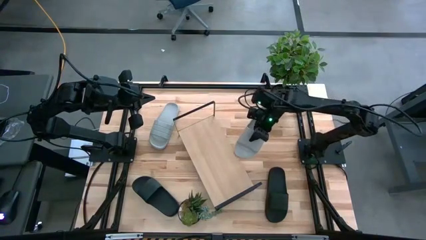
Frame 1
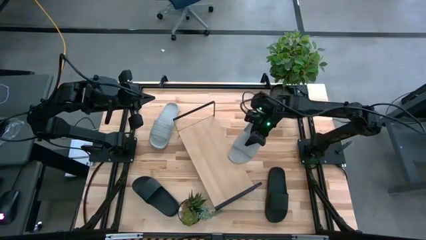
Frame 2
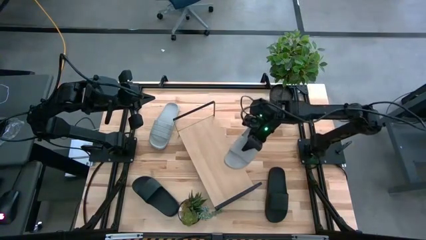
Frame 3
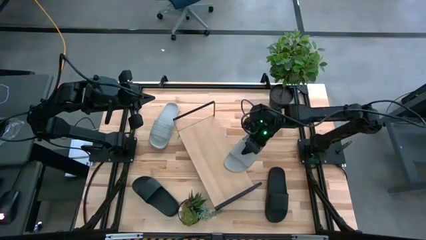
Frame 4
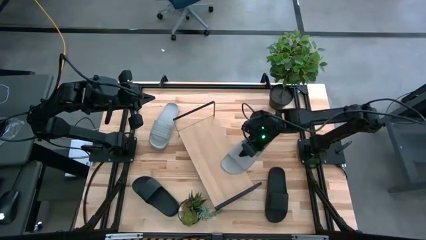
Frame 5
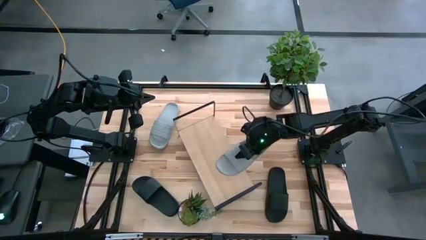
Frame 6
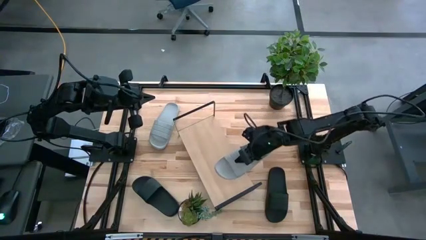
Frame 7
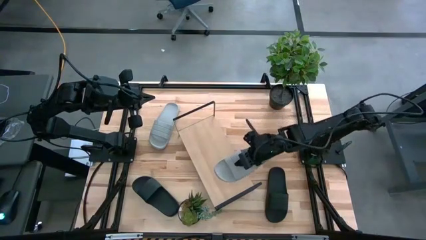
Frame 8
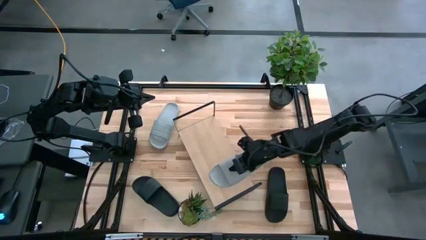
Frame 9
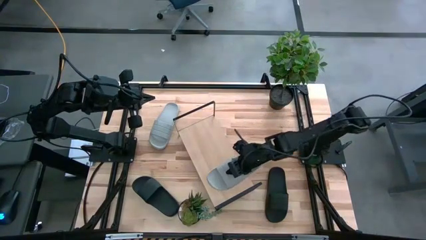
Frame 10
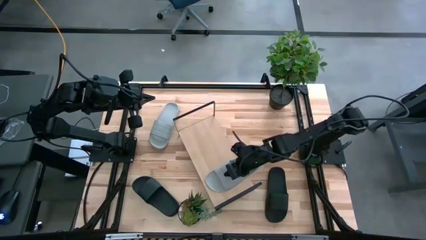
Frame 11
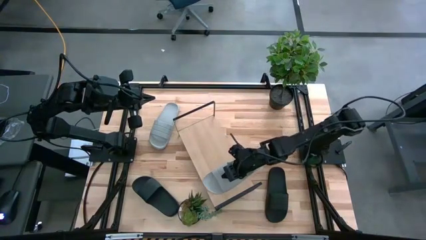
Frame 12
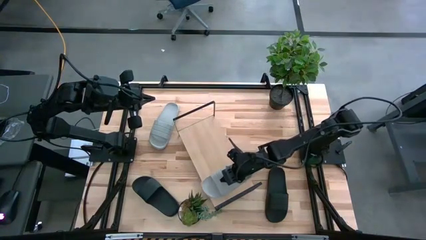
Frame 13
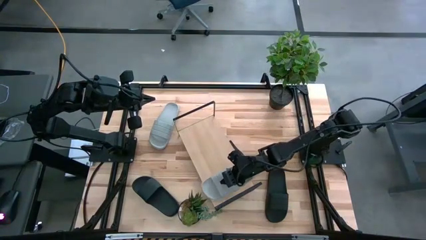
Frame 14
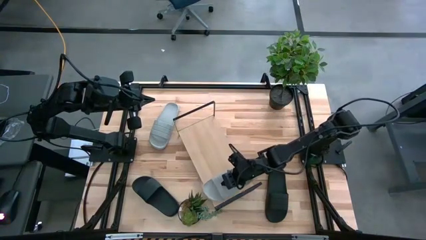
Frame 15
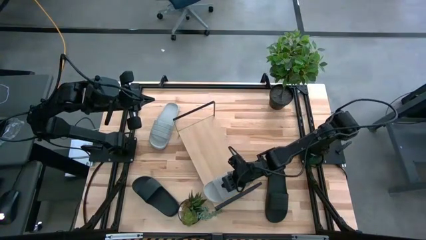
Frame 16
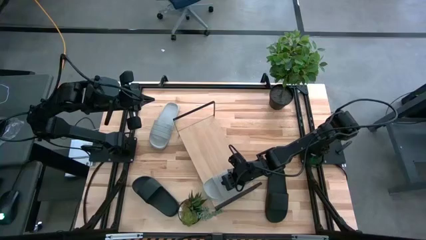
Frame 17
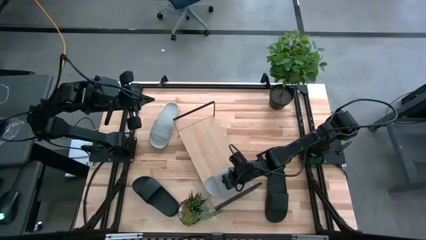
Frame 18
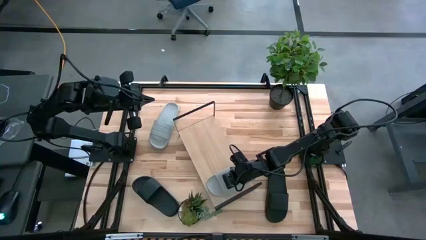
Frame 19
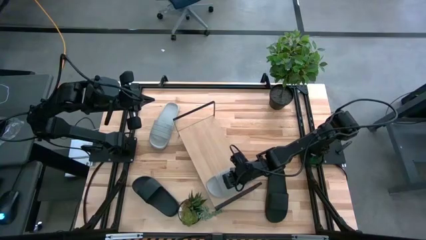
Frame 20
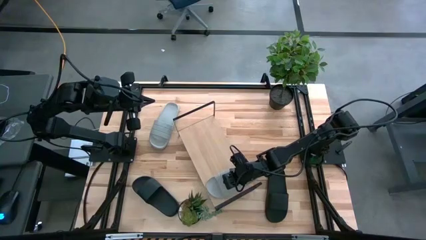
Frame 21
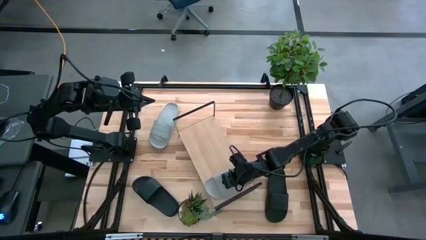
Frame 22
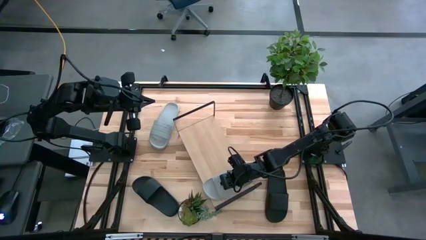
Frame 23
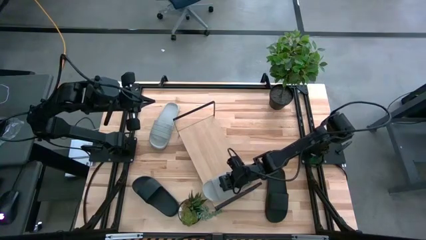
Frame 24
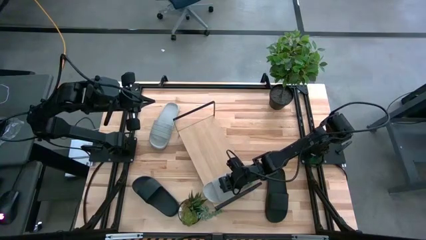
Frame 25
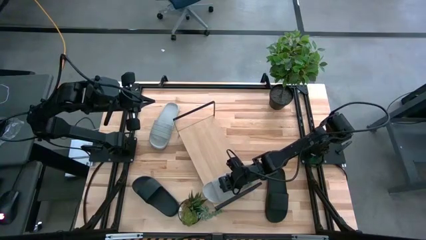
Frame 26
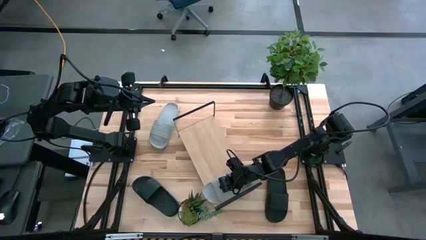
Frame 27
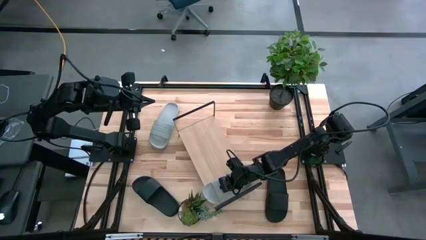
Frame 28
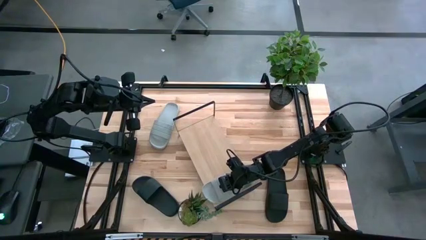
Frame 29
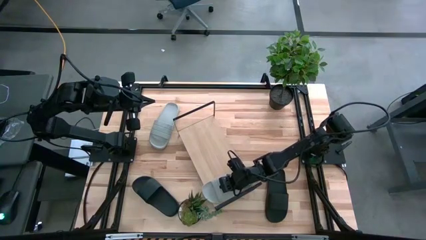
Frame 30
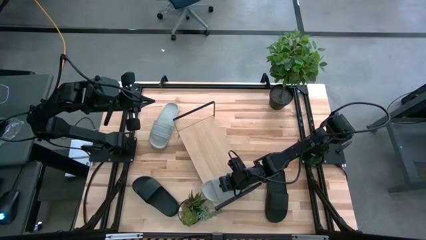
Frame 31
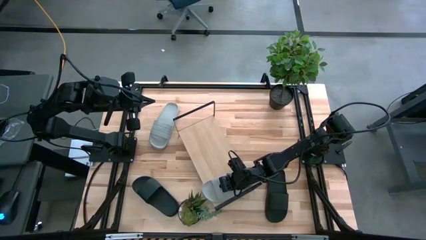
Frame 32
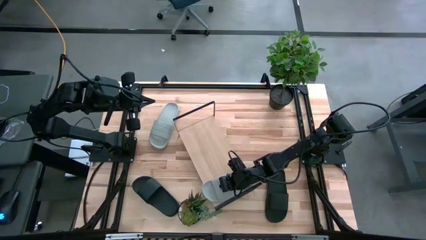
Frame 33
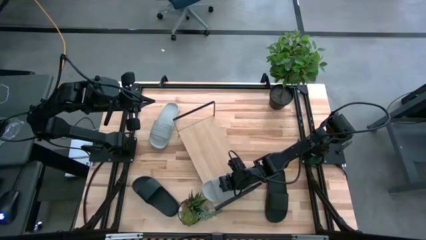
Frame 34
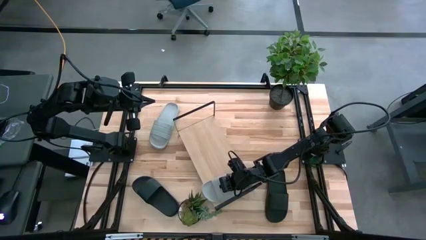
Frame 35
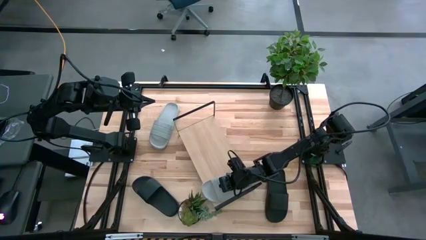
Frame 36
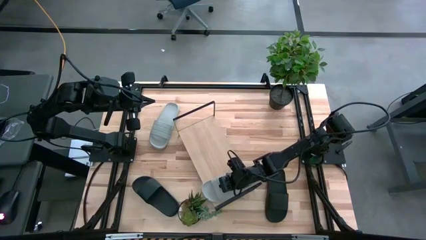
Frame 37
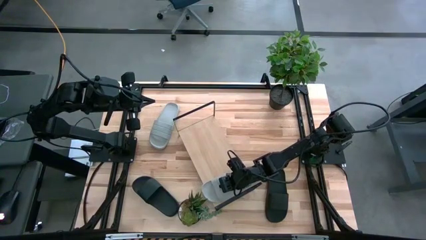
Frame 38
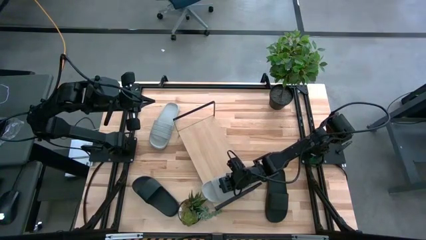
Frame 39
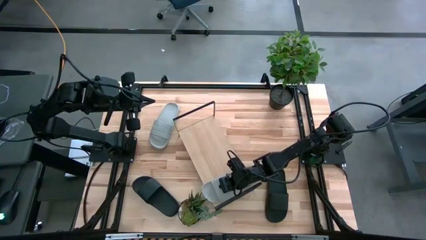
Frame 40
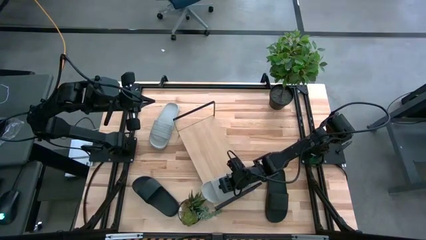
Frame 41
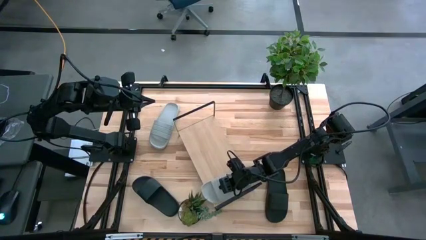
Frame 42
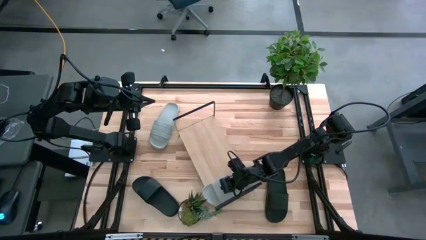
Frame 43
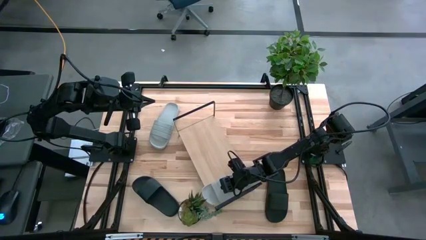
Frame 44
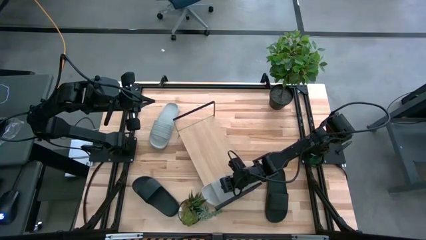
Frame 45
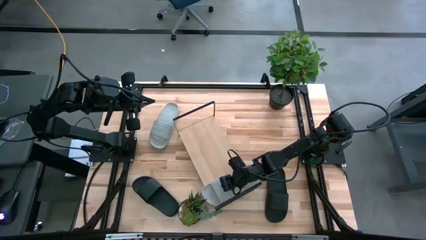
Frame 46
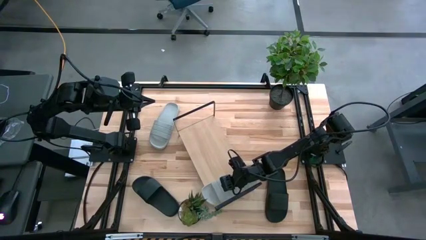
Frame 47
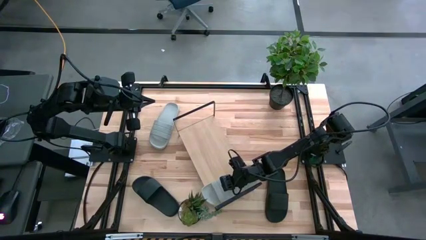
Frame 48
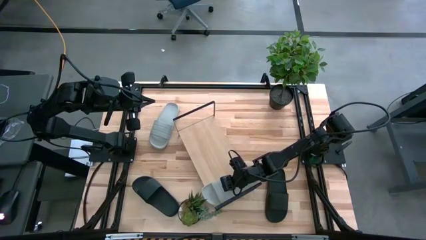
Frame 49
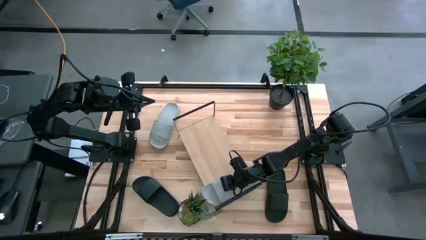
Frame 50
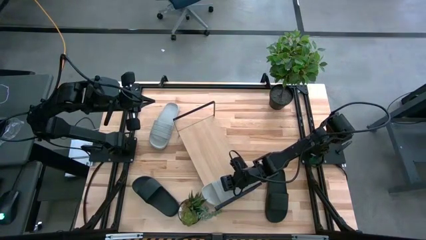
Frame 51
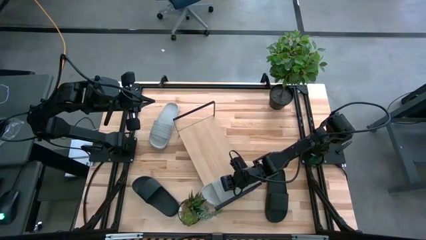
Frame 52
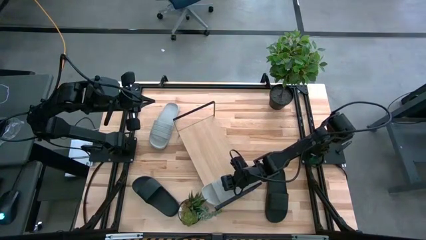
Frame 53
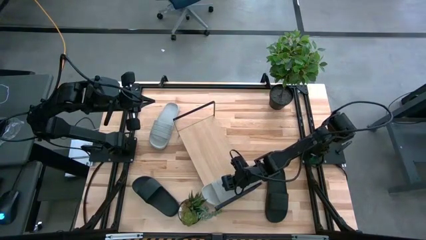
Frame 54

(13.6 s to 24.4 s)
Task: Pick and place slides into the shelf
Put the right grey slipper on the shelf
